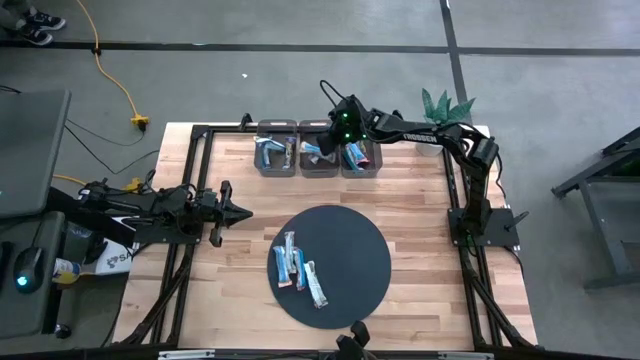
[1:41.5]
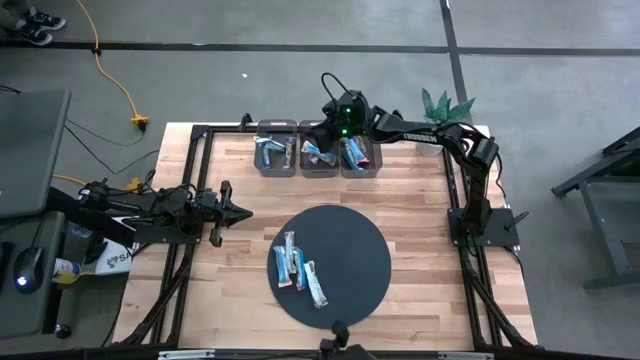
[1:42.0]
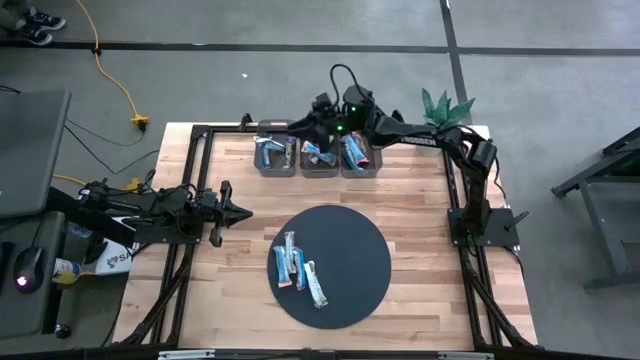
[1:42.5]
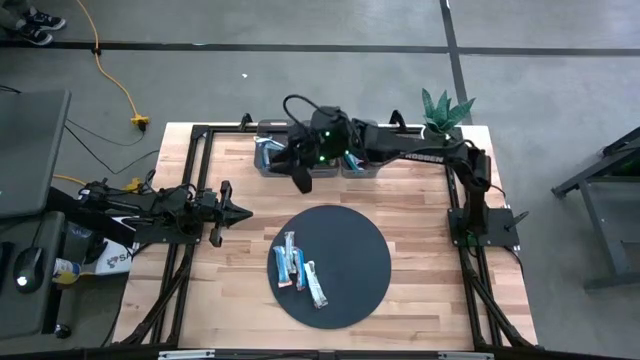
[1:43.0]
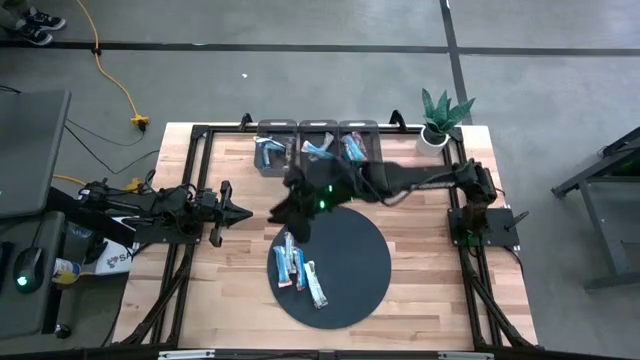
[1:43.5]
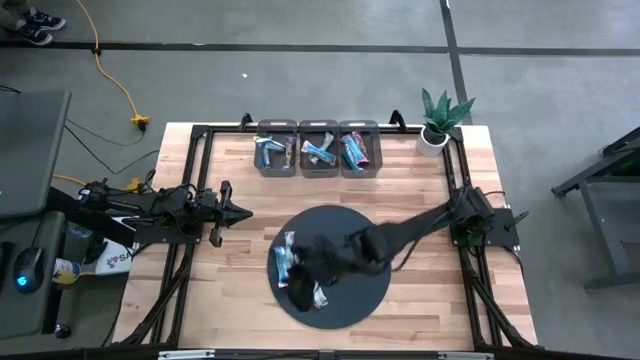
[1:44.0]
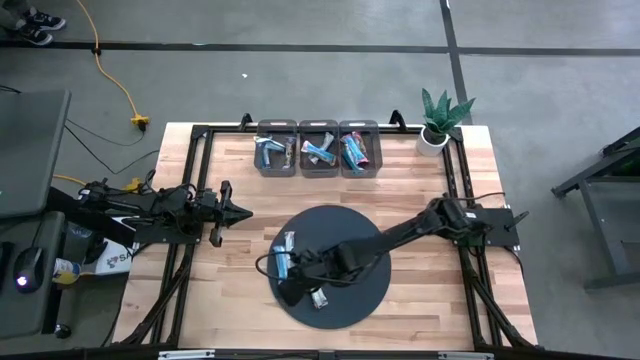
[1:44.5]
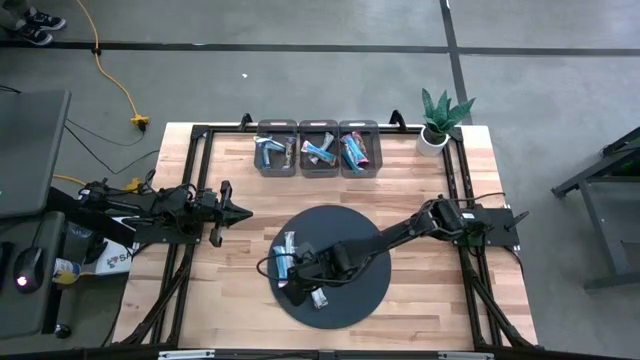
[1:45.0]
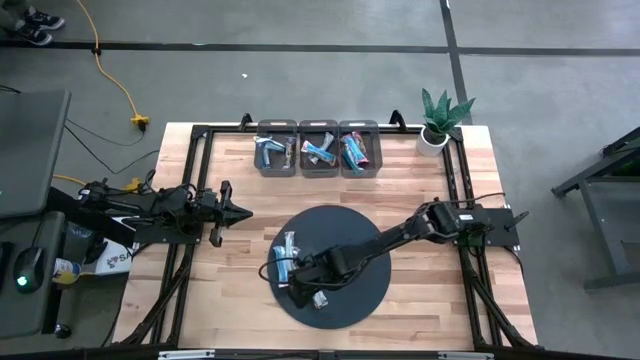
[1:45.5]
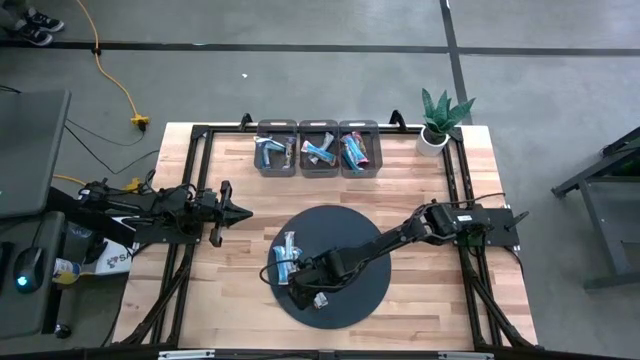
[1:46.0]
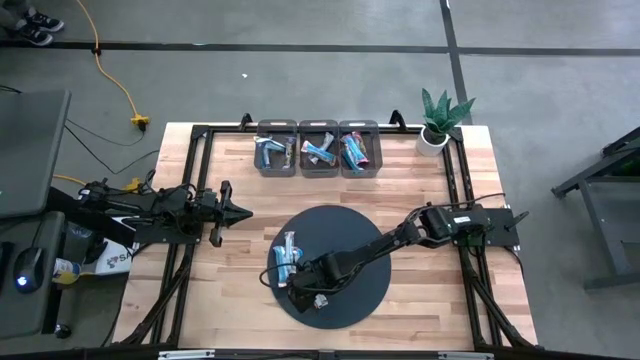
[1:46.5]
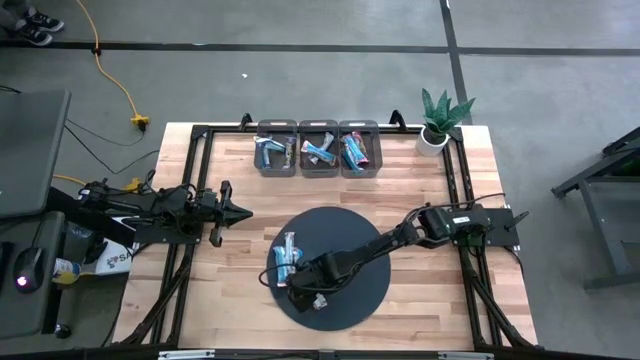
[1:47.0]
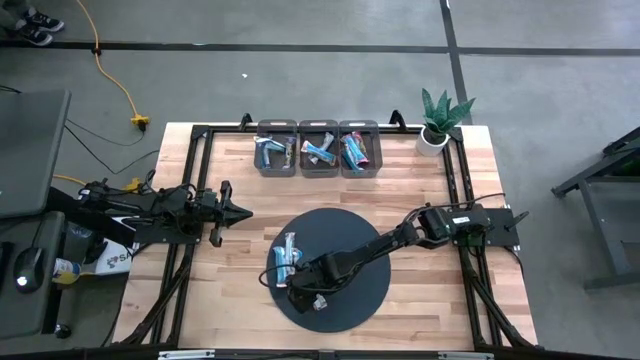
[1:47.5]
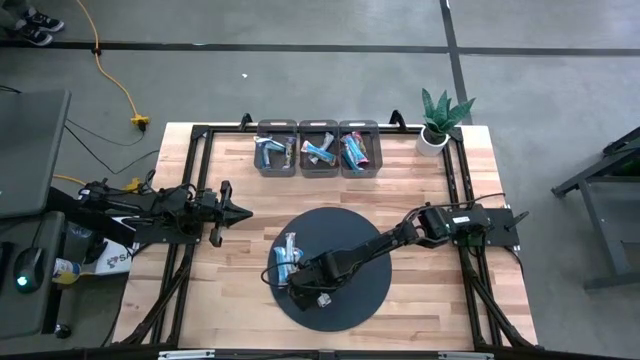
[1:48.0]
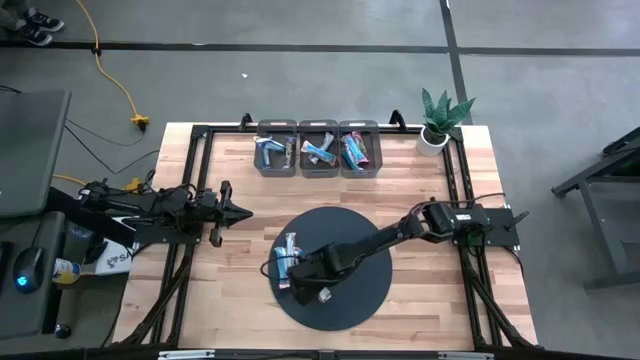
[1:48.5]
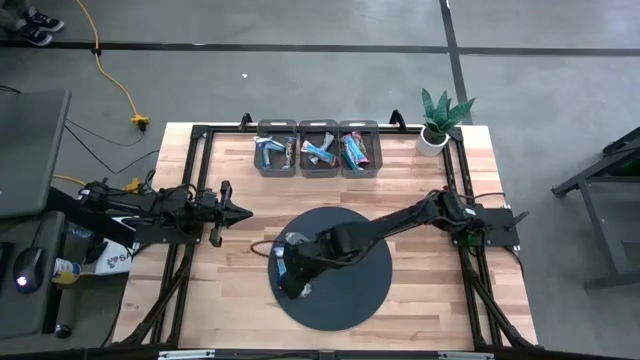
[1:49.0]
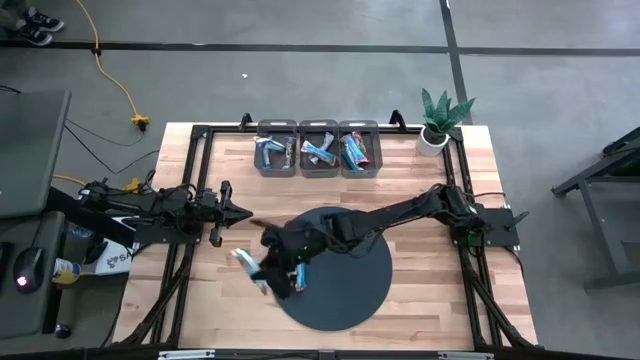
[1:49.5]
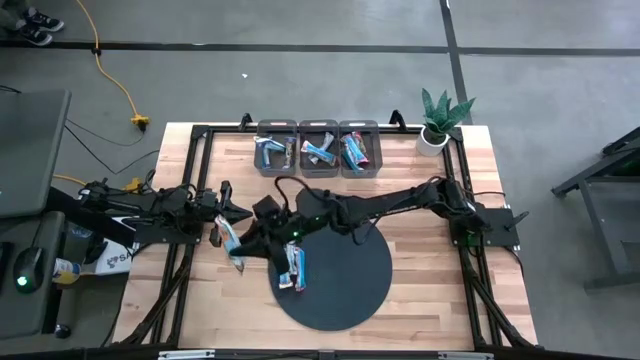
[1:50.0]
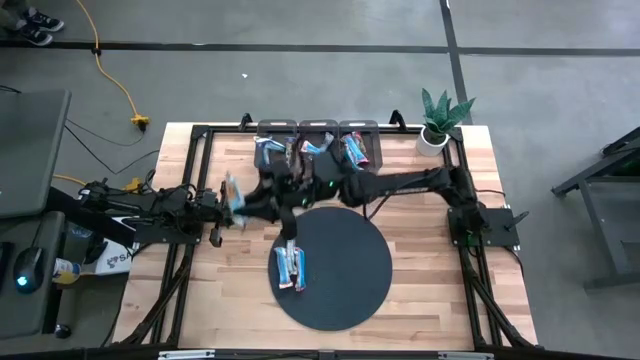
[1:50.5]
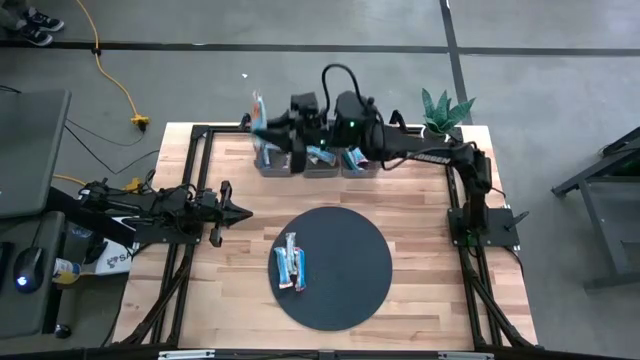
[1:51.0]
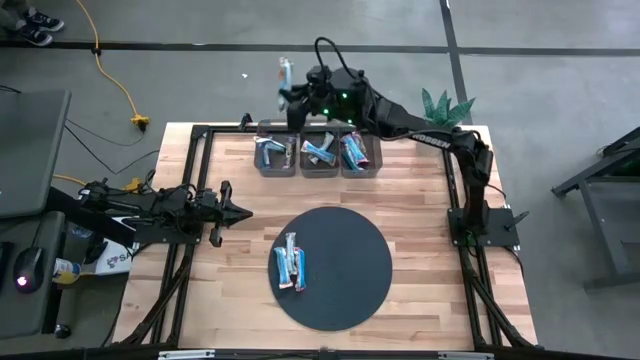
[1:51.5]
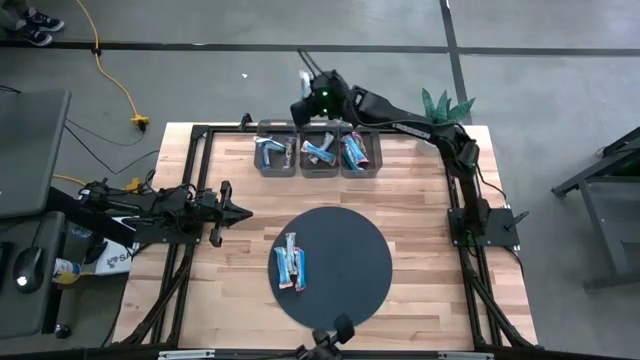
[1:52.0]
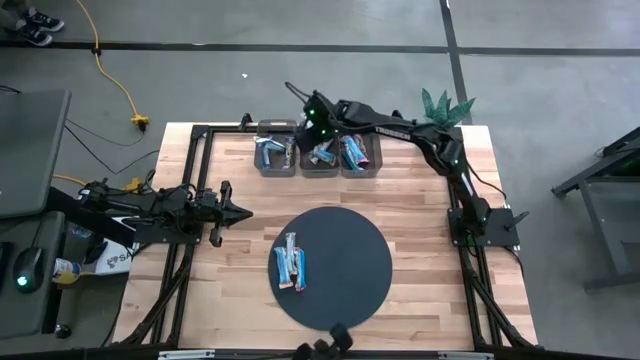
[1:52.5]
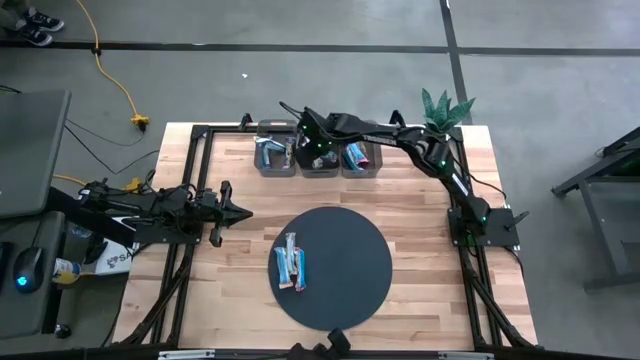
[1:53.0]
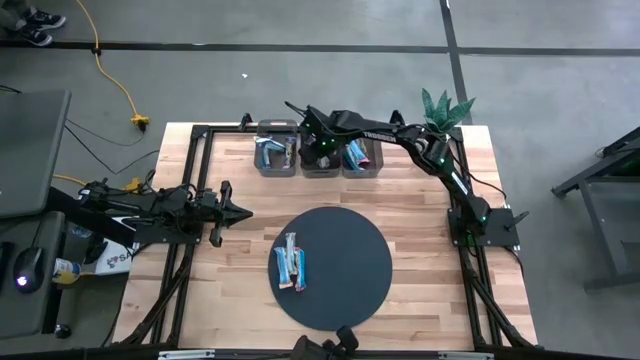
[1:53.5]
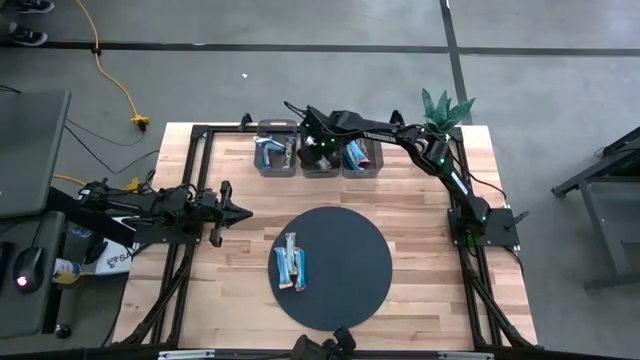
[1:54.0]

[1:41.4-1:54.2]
Task: Pick and place Granola Bars by type
Put the yellow granola bar into the middle black bin

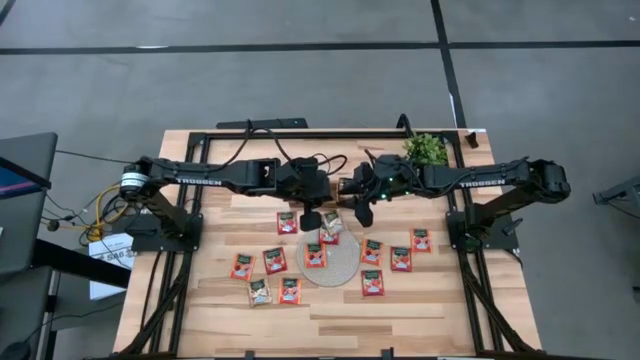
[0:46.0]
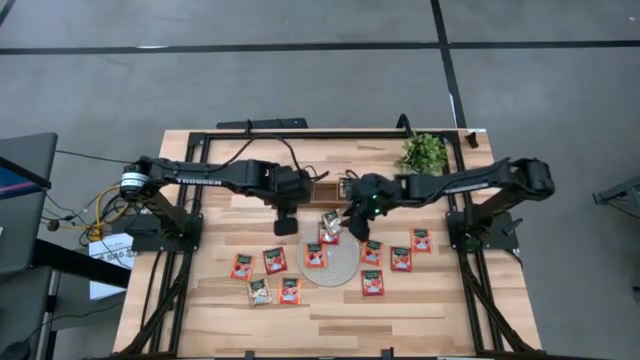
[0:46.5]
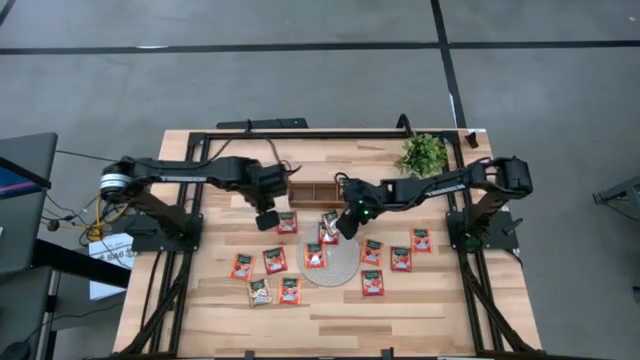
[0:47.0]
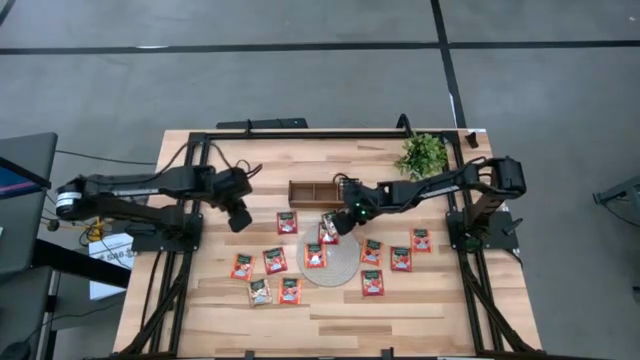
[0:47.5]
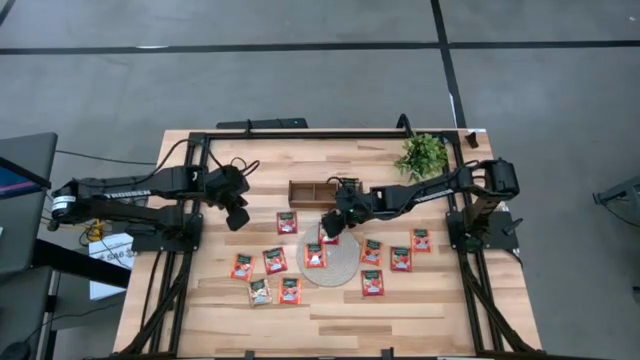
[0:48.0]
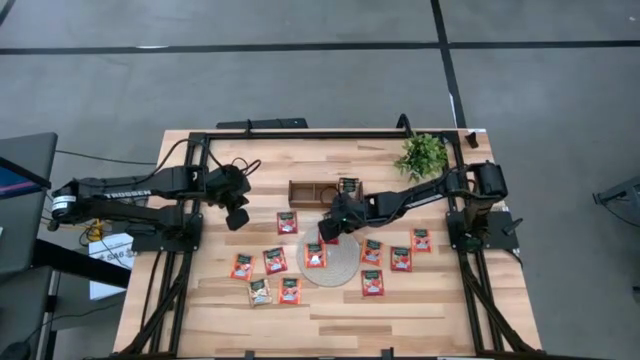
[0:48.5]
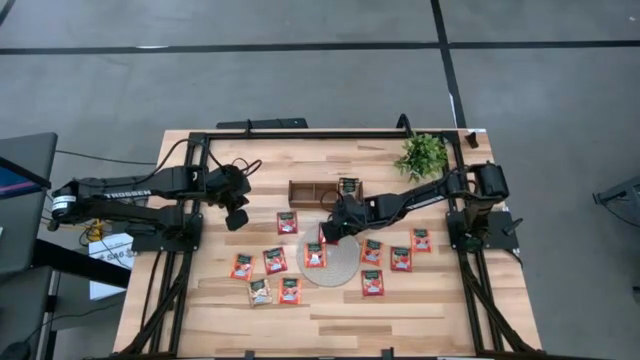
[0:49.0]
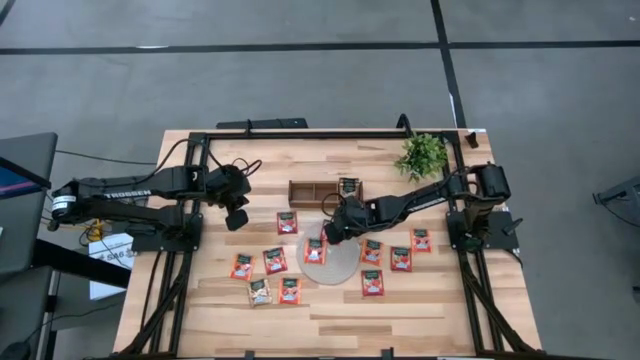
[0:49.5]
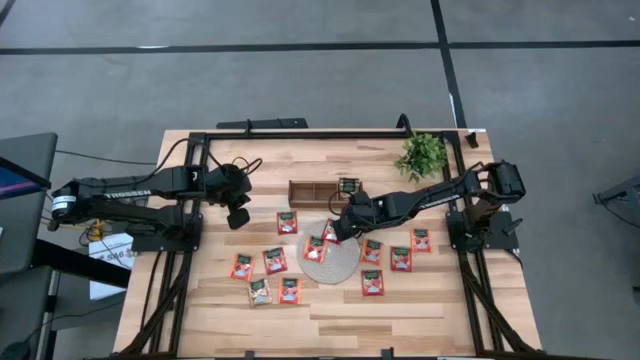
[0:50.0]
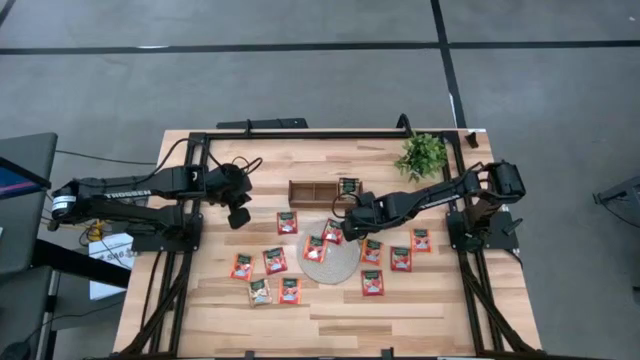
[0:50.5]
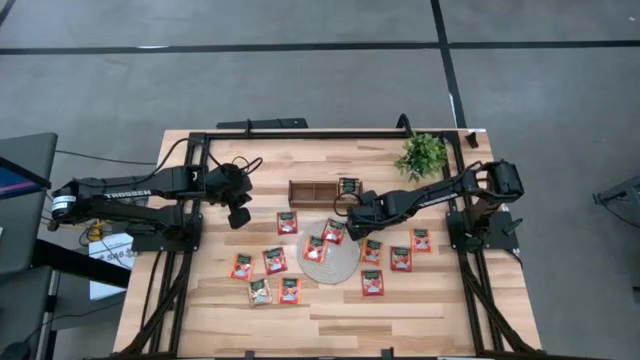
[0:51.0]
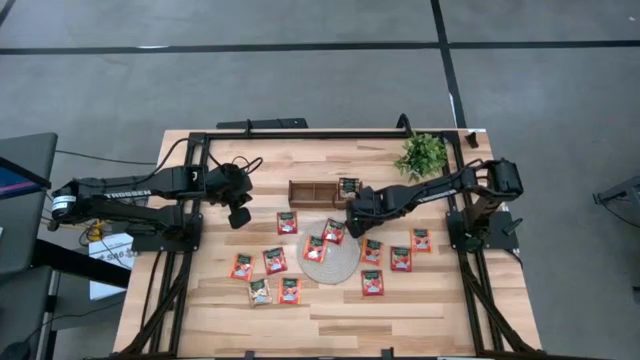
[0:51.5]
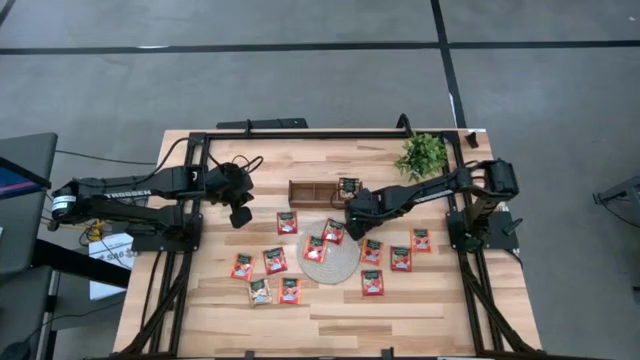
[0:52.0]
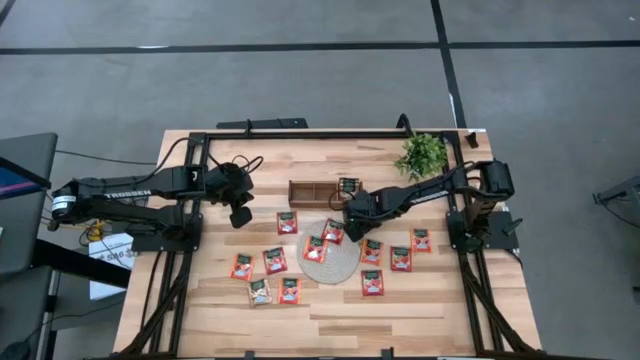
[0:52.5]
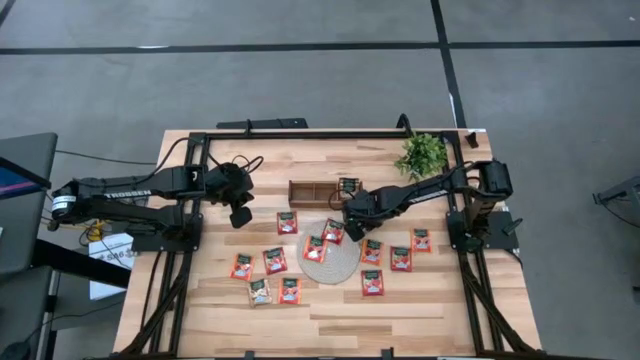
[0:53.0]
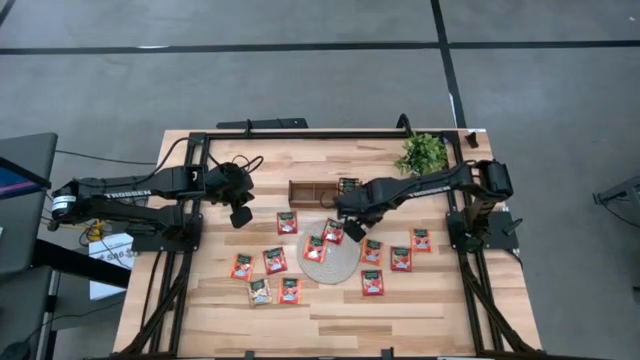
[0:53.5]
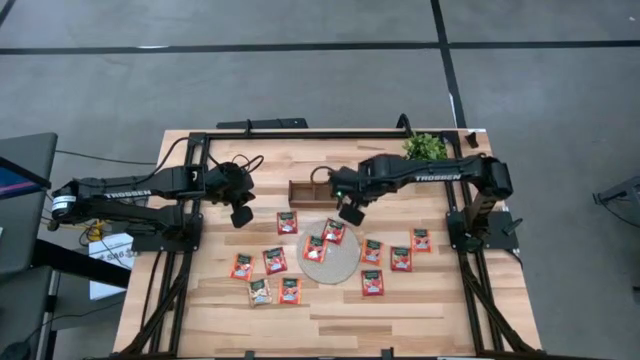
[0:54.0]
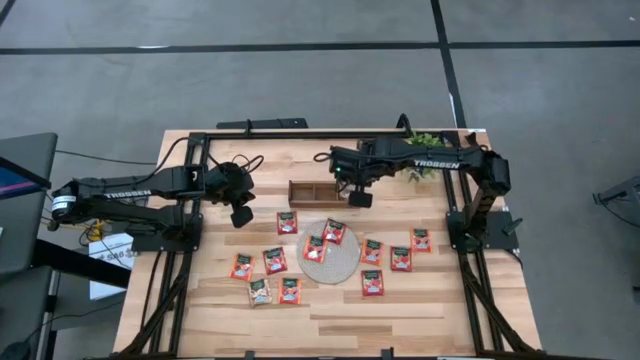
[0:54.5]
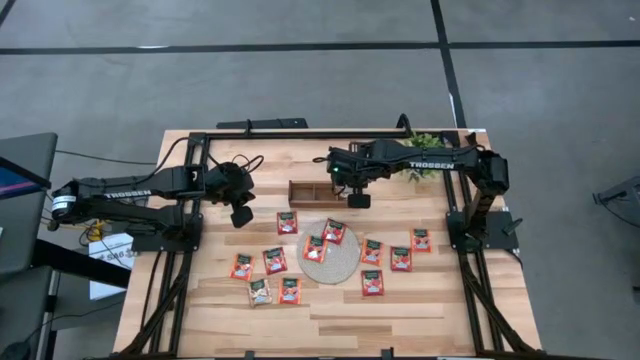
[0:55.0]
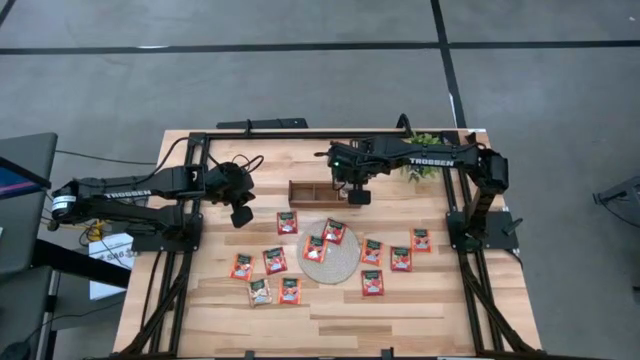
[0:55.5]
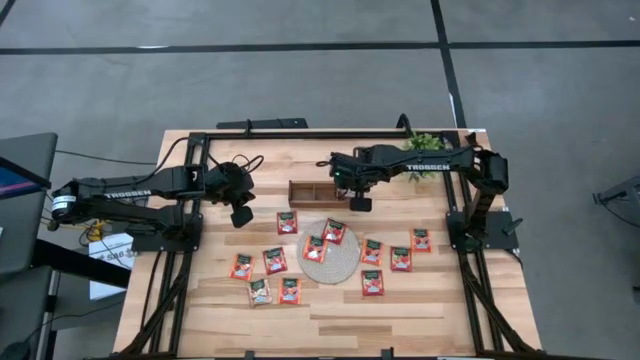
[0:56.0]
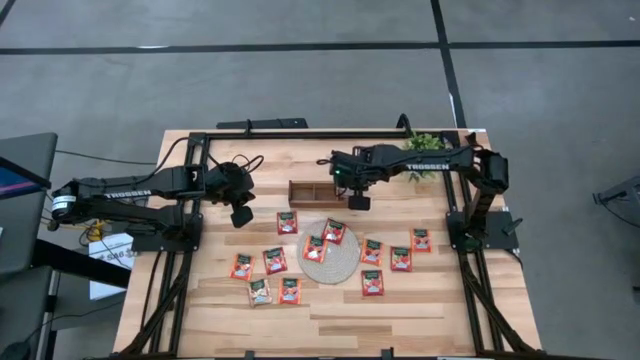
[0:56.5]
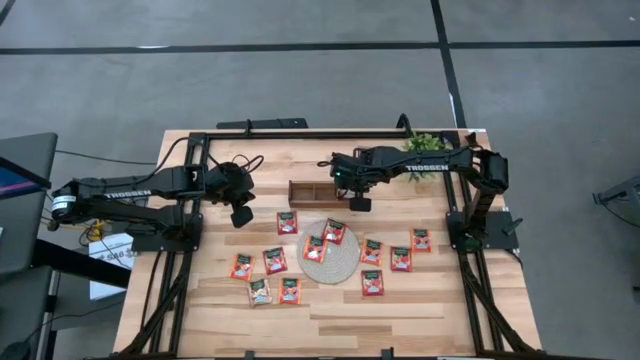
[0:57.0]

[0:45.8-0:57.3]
Task: Pick & Place Tea
Put the brown tea bag into the right section of the wooden organizer
